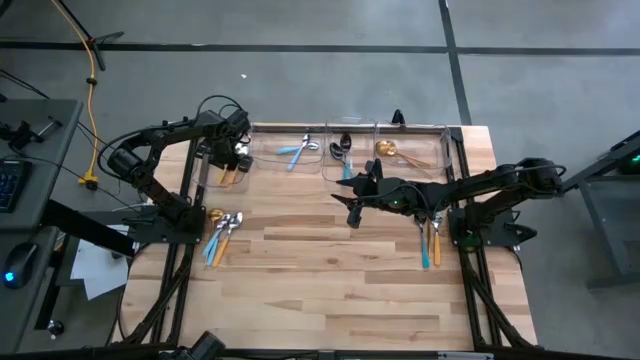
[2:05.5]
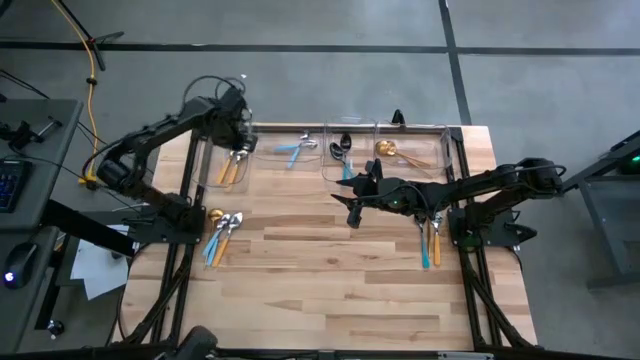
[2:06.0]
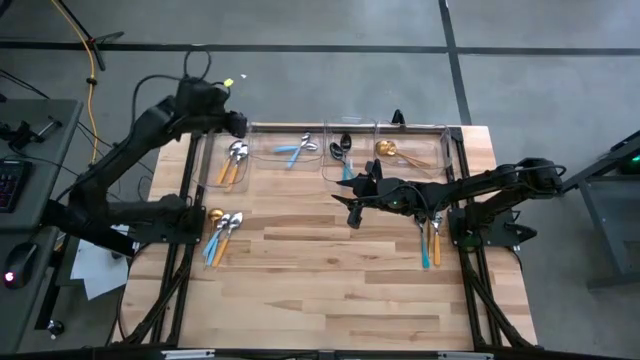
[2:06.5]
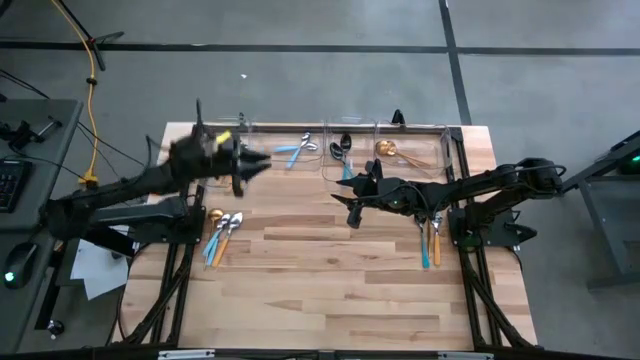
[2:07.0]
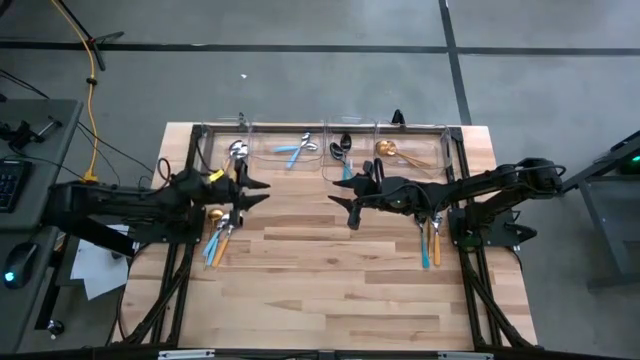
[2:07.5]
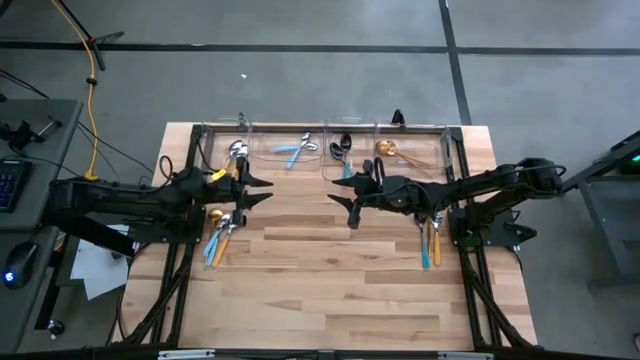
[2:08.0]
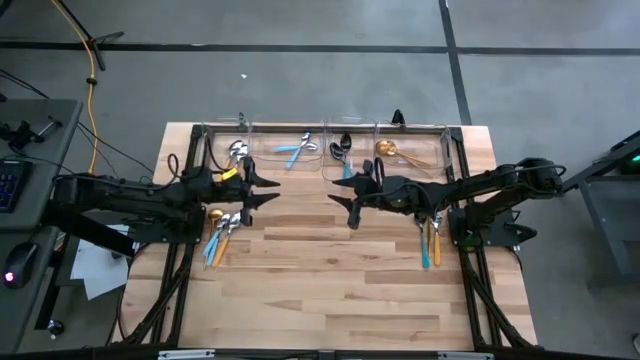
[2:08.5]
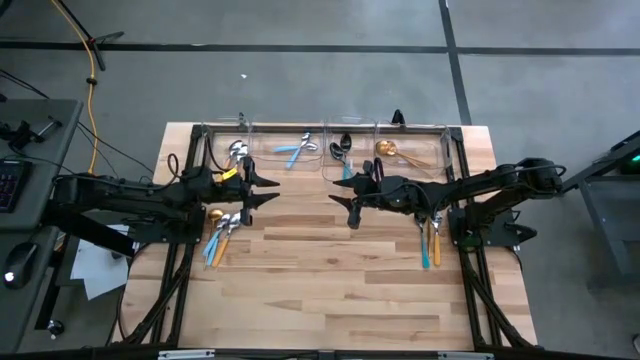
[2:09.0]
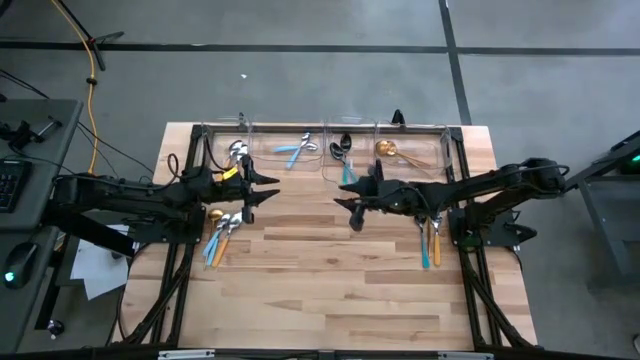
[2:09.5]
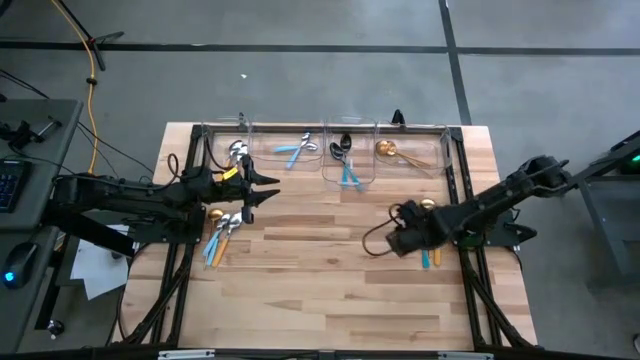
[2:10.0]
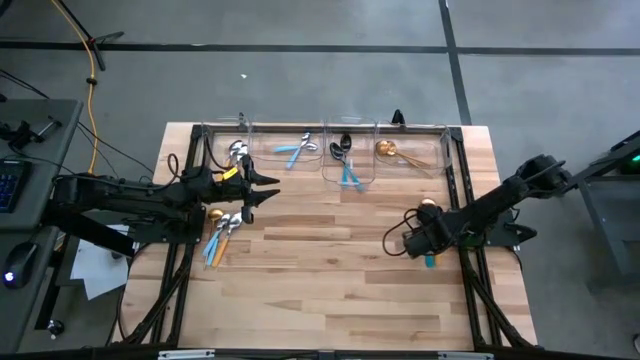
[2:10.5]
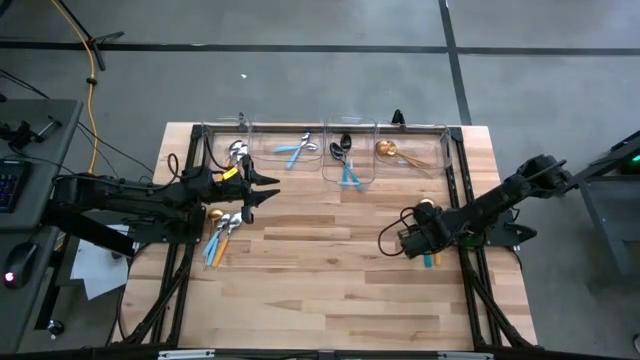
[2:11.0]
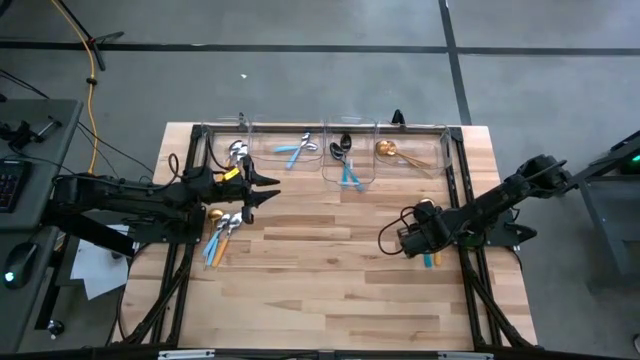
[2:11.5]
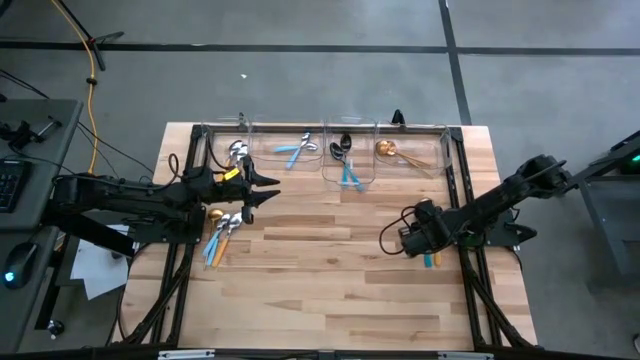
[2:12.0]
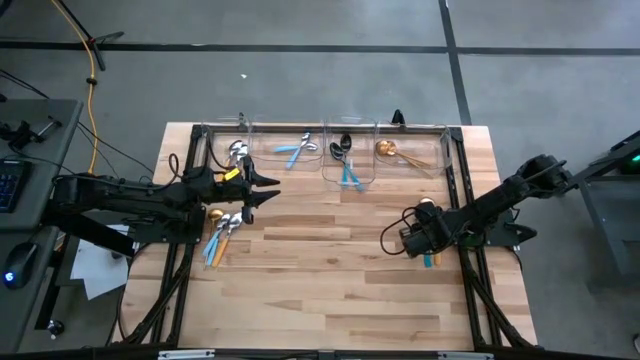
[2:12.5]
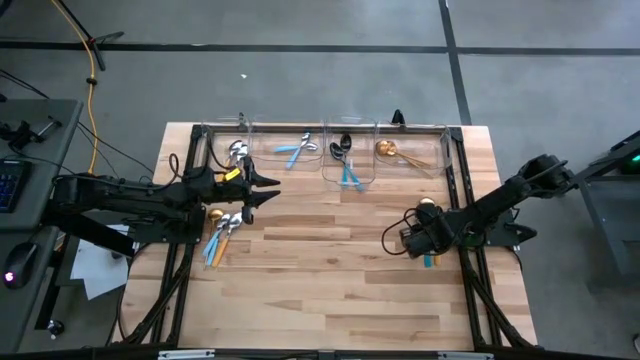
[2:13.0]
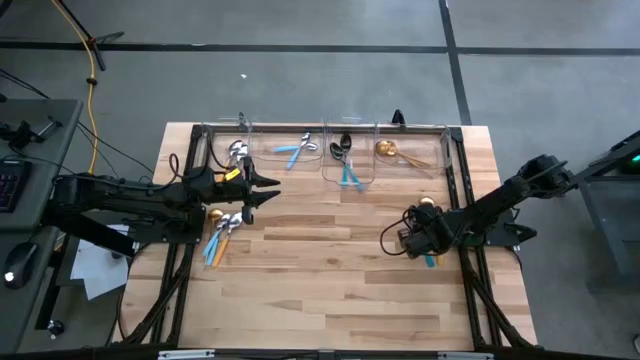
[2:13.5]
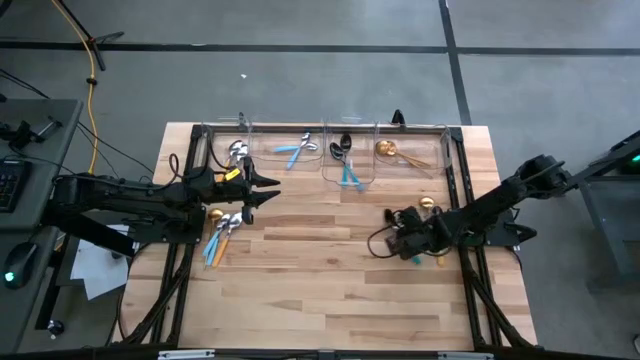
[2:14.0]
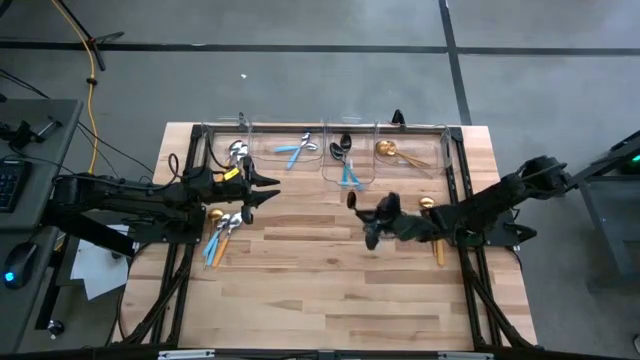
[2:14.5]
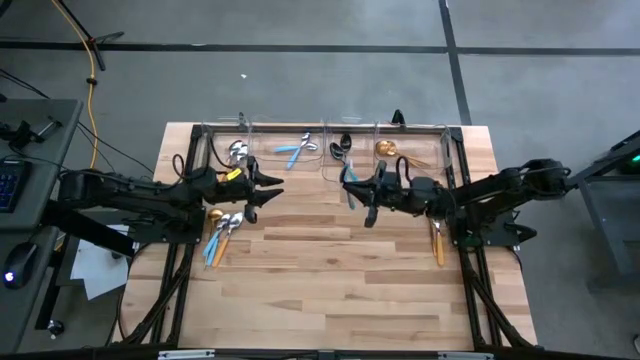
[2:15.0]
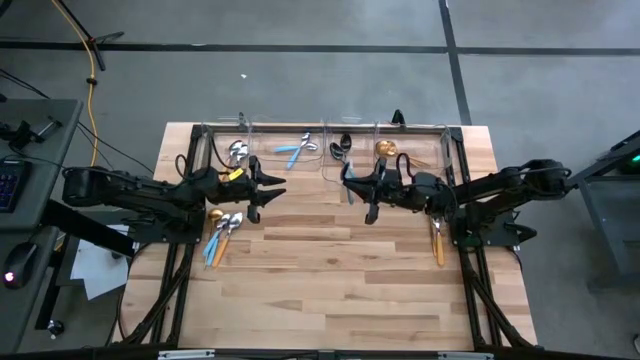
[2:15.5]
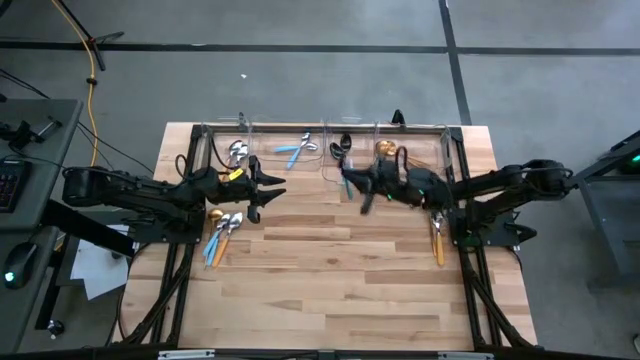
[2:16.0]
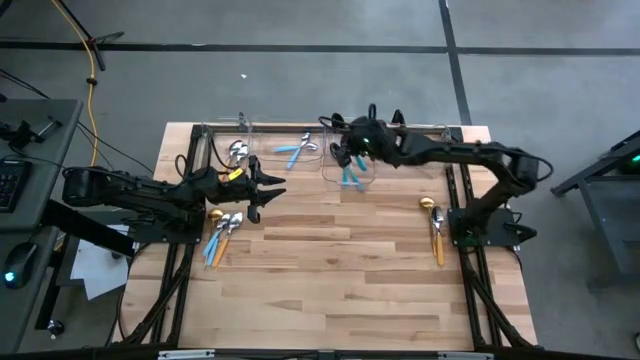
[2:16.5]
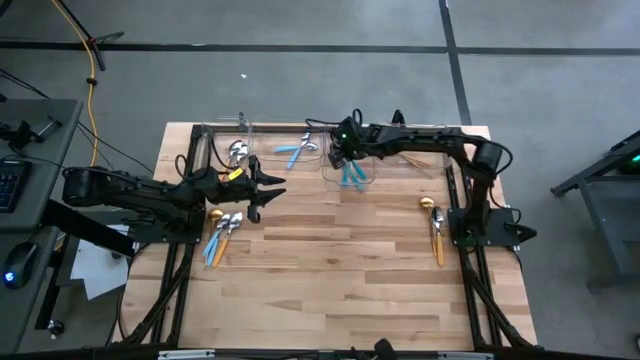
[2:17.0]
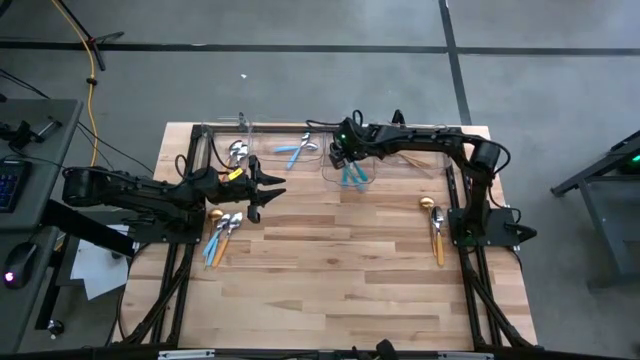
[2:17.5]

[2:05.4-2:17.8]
Task: Sort silverware by color (type)
Put the black spoon into the middle right transparent bin

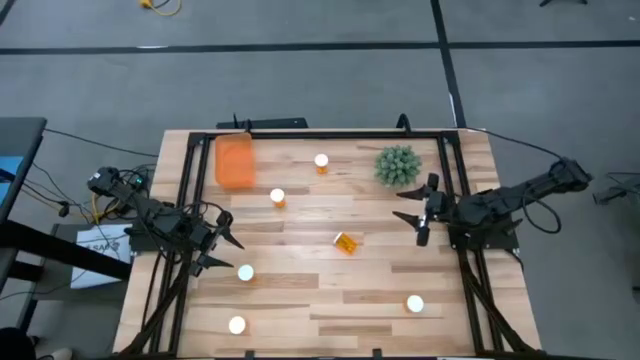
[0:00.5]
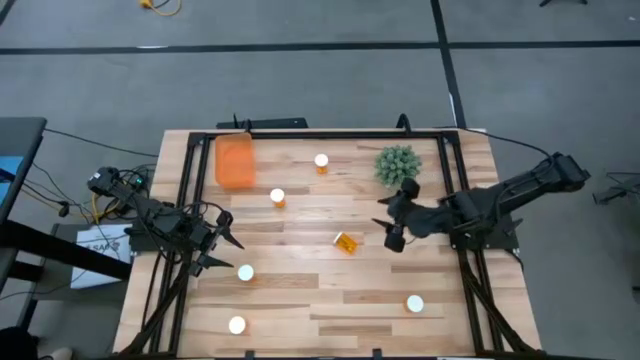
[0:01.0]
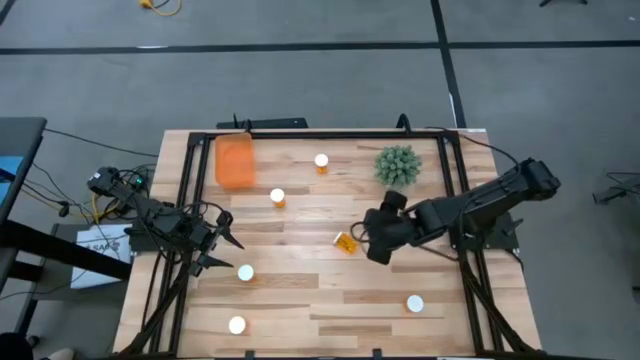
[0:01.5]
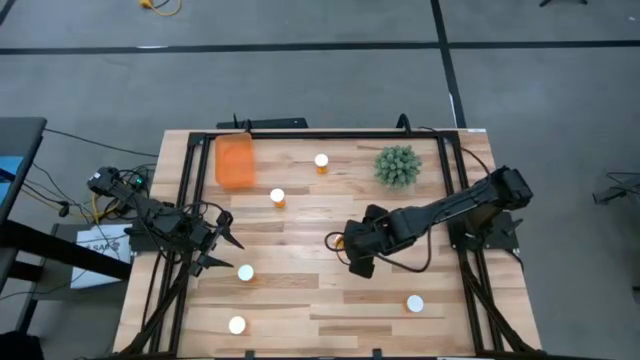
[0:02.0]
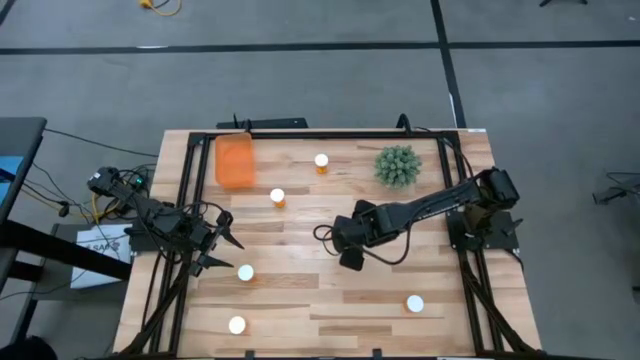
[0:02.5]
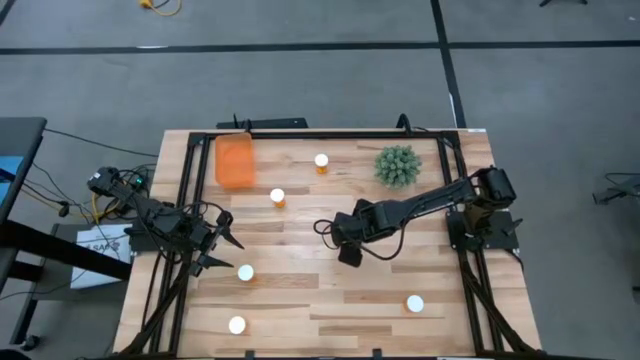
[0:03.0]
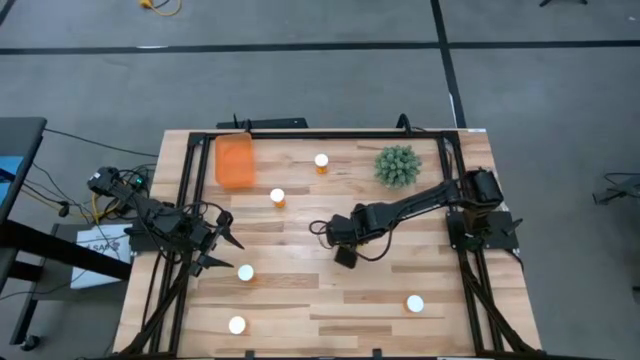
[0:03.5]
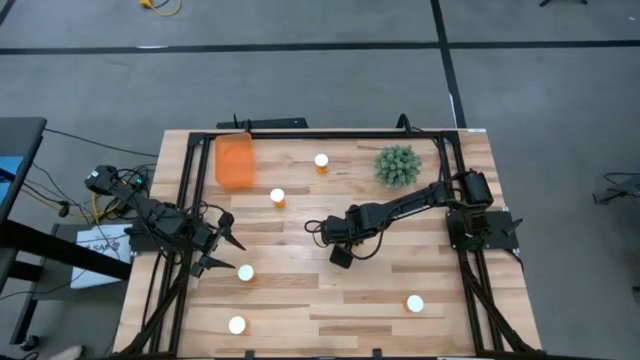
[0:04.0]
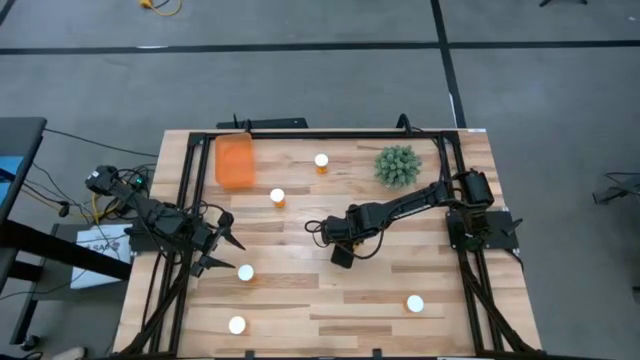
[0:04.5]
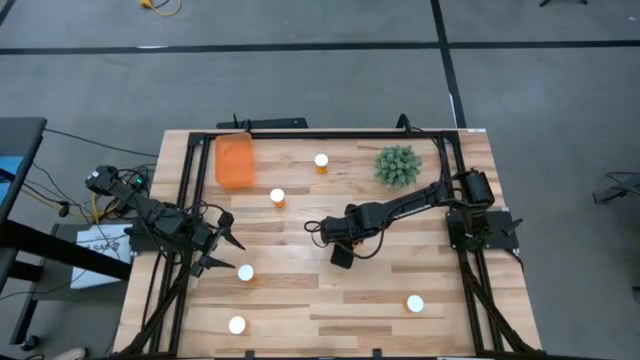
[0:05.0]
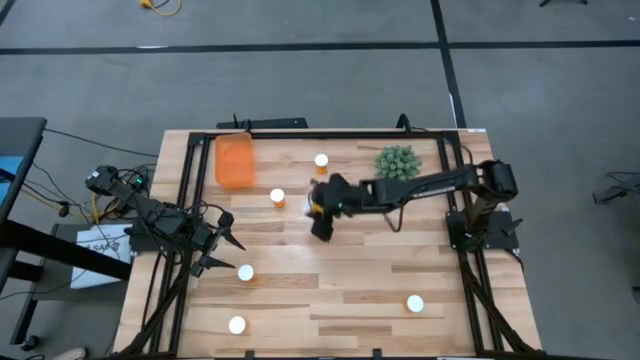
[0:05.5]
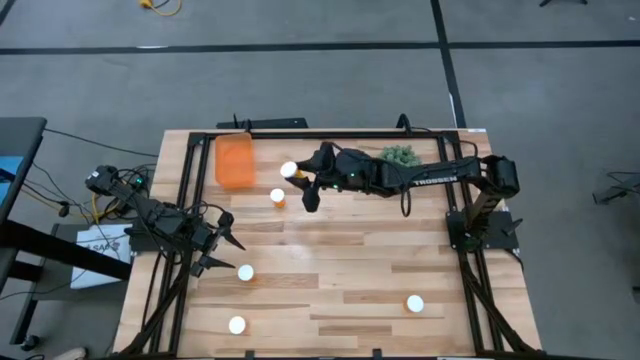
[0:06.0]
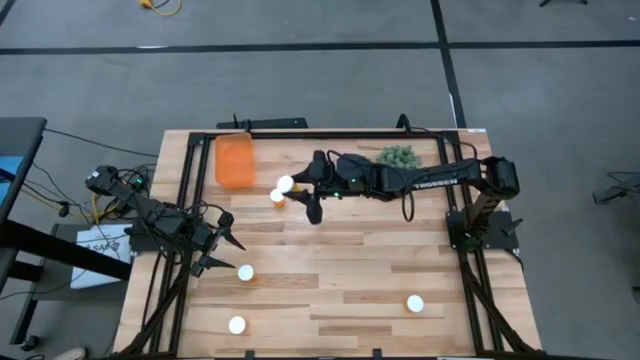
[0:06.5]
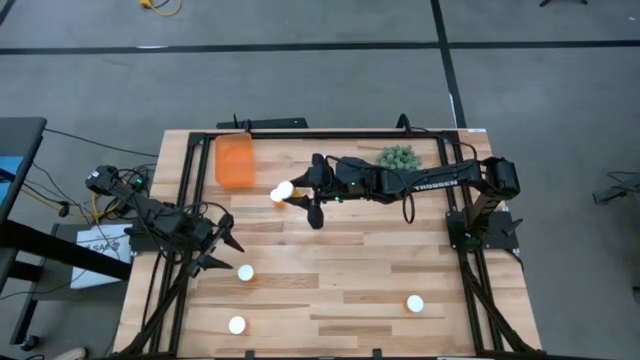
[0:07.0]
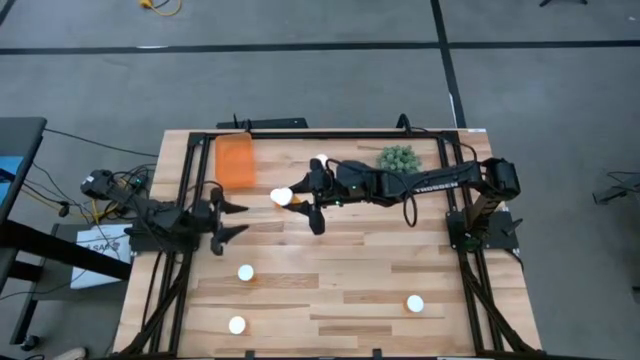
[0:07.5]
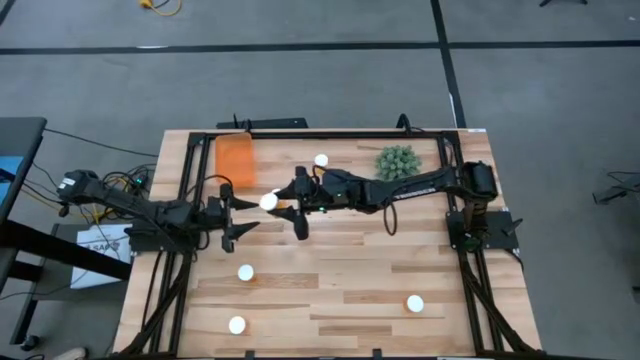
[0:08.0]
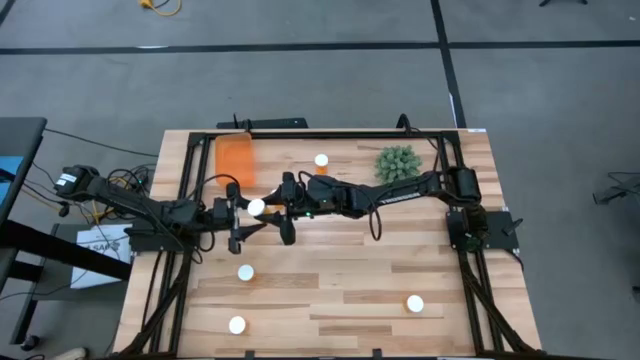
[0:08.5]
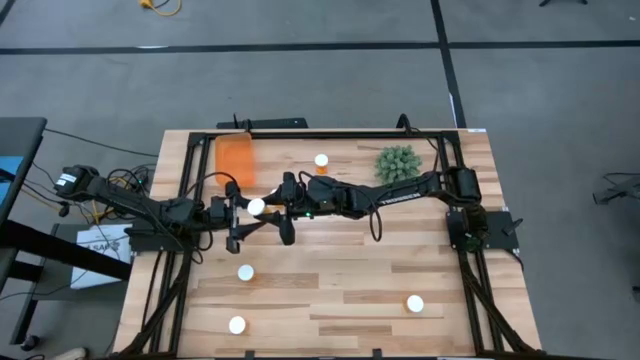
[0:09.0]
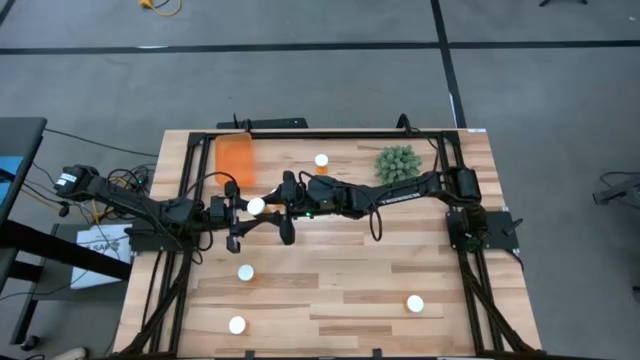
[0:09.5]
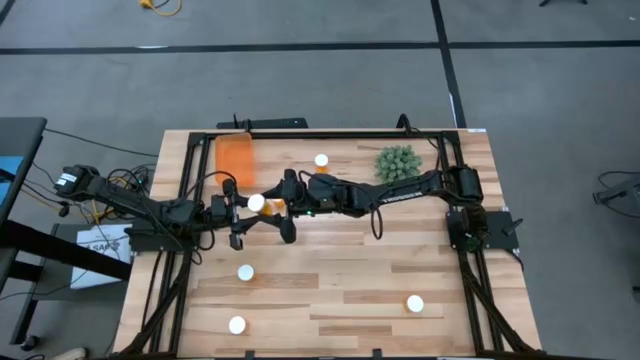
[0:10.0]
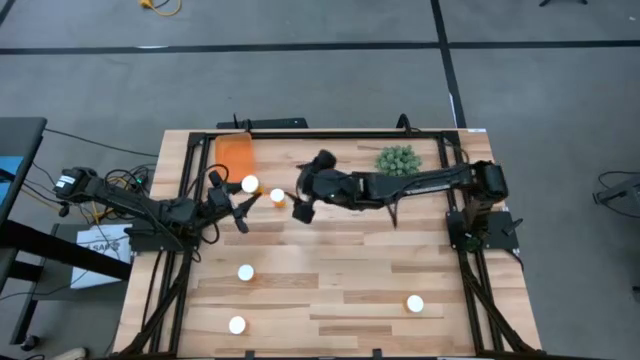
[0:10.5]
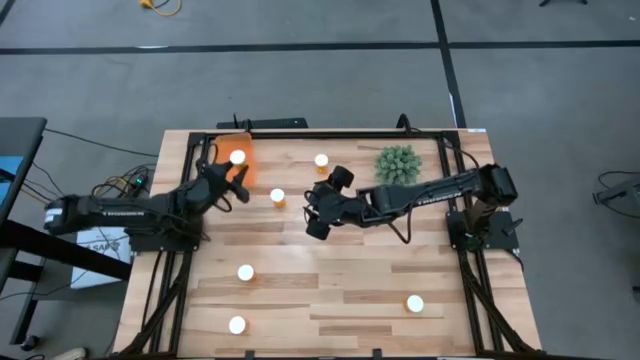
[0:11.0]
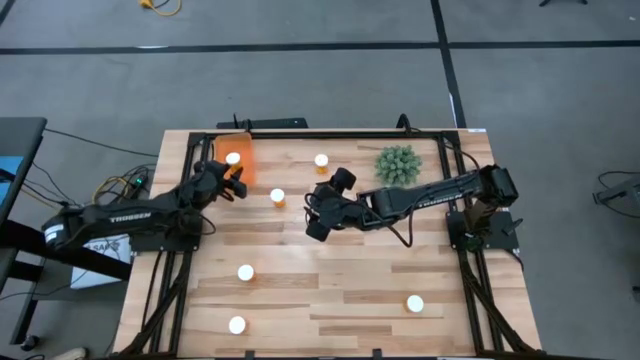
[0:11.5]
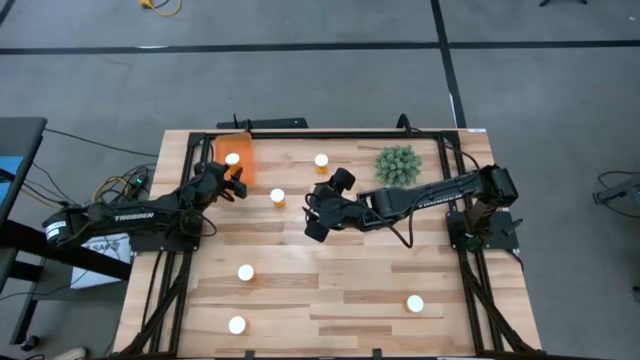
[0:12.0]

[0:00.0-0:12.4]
Task: Pick and place pill bottles into a basket
Put the orange pill bottle into the orange container
